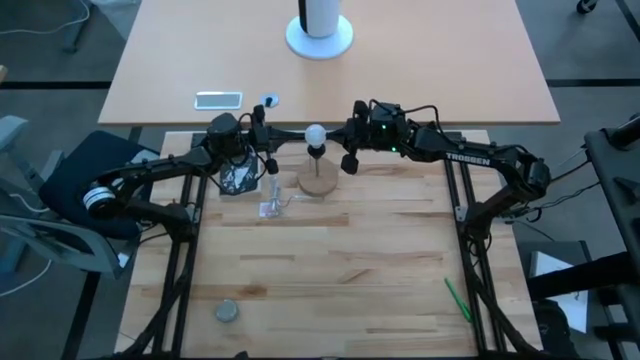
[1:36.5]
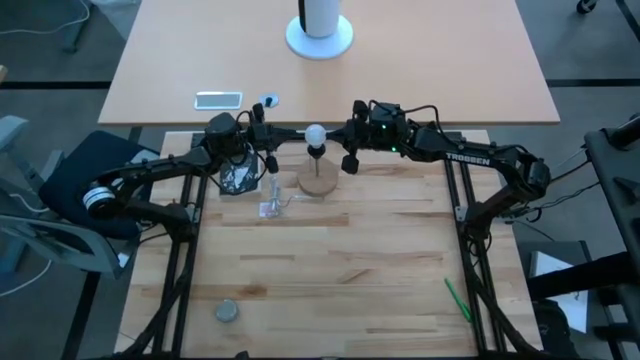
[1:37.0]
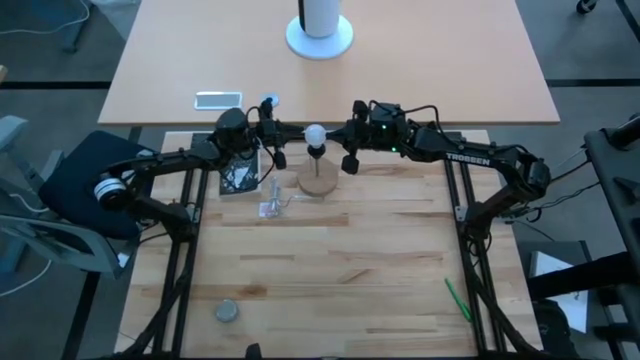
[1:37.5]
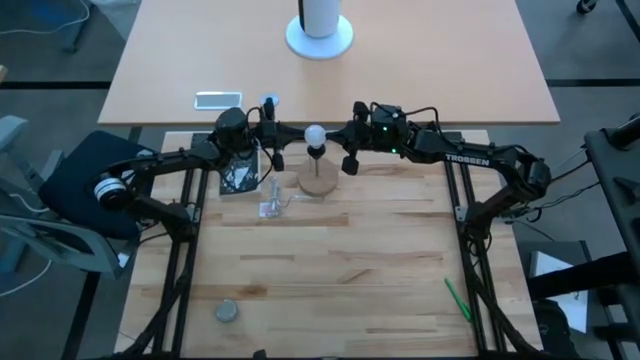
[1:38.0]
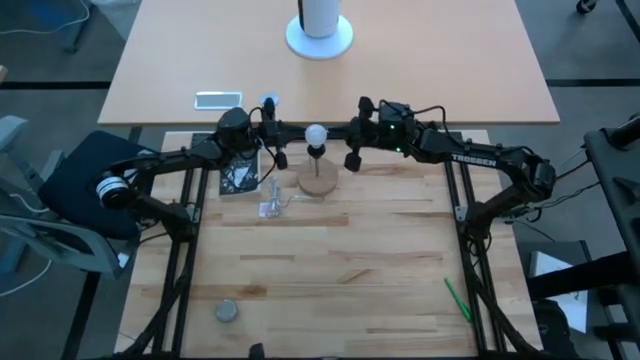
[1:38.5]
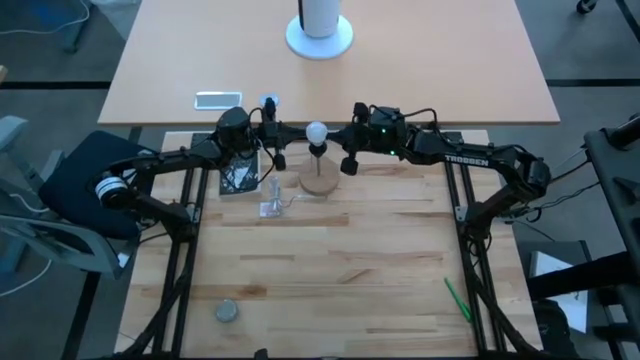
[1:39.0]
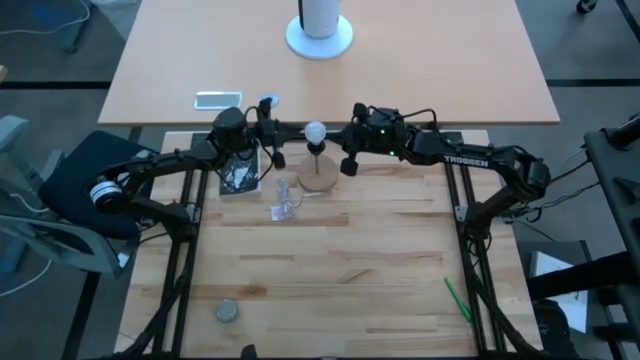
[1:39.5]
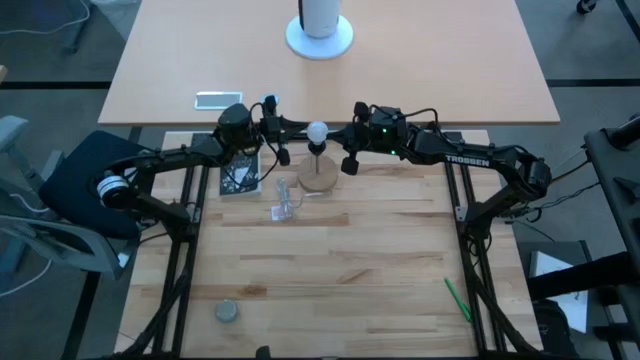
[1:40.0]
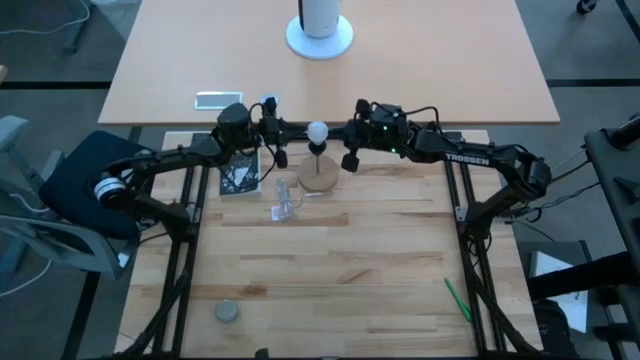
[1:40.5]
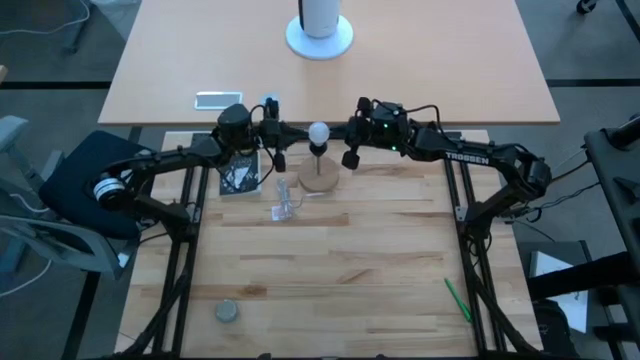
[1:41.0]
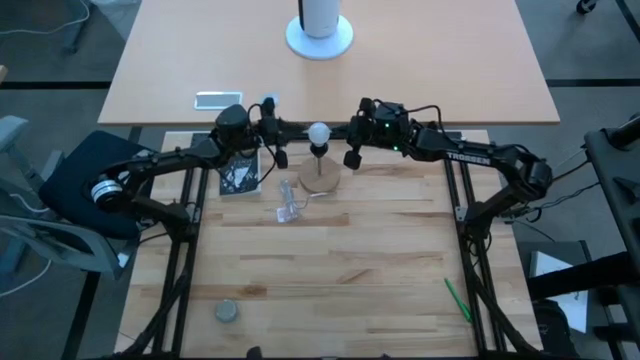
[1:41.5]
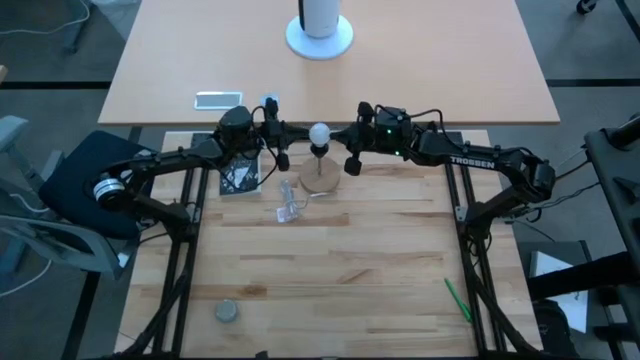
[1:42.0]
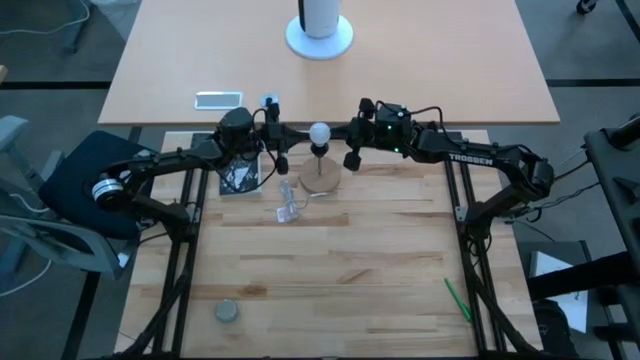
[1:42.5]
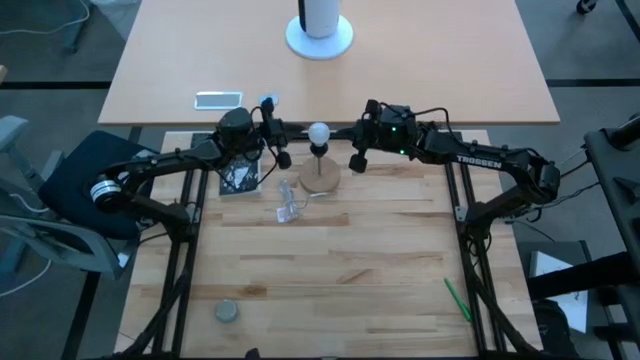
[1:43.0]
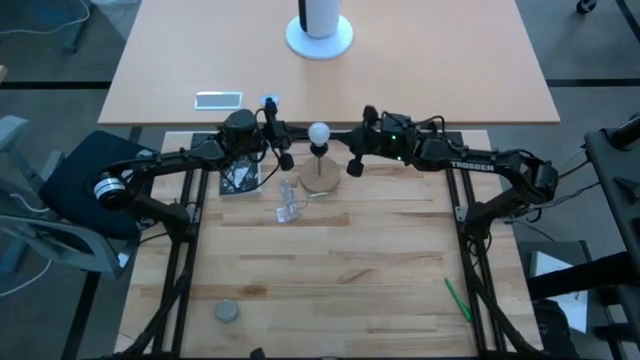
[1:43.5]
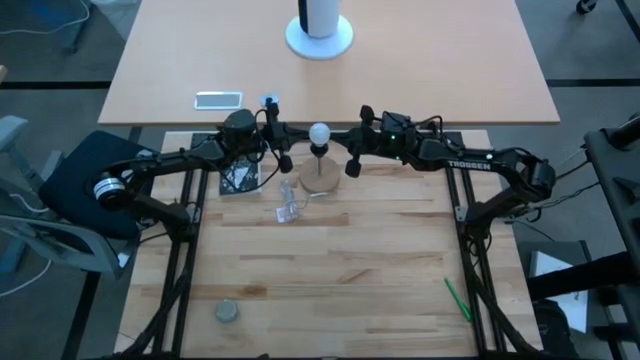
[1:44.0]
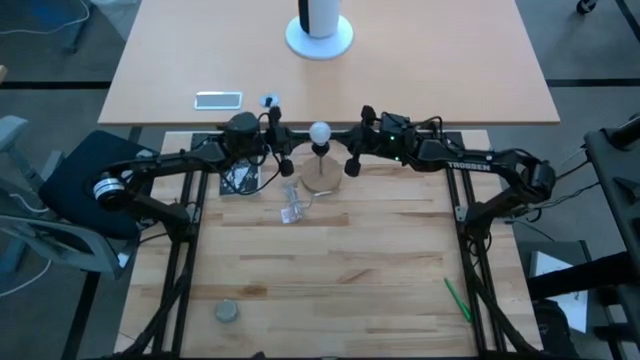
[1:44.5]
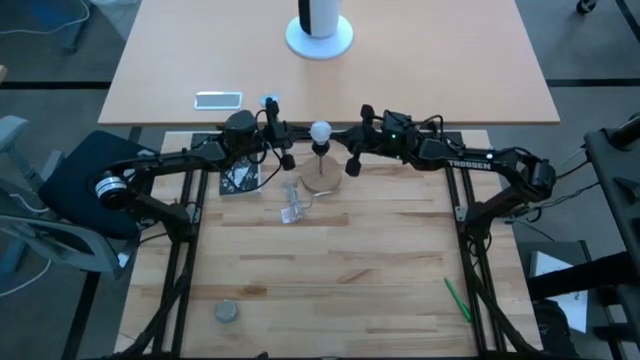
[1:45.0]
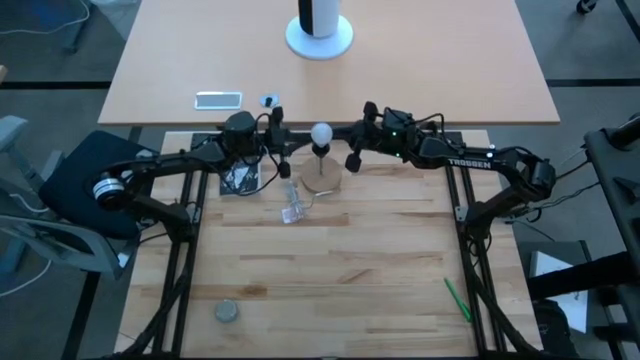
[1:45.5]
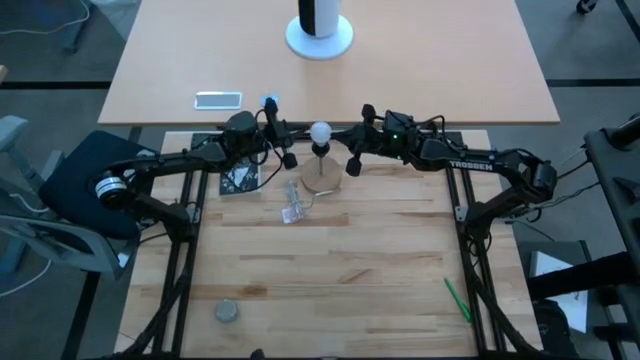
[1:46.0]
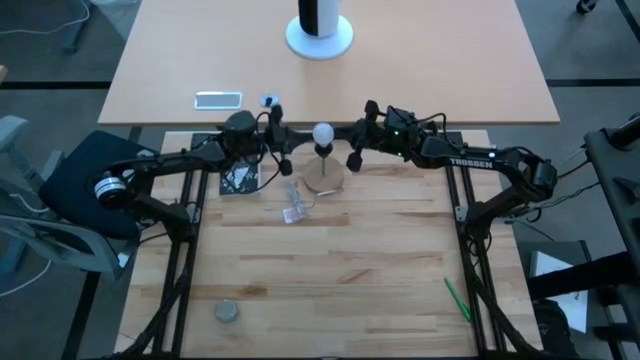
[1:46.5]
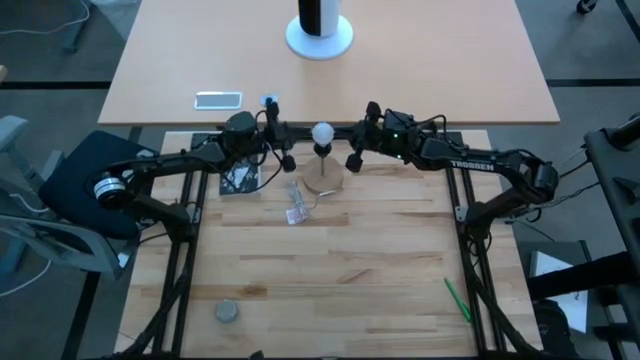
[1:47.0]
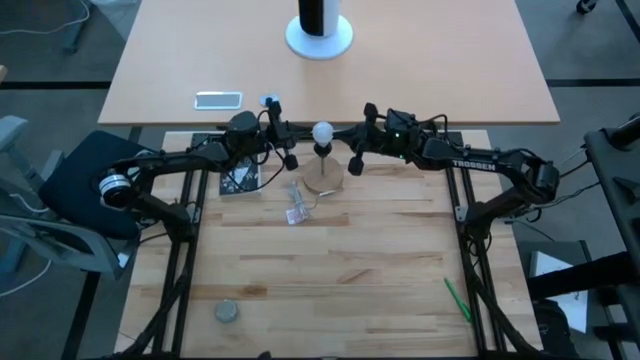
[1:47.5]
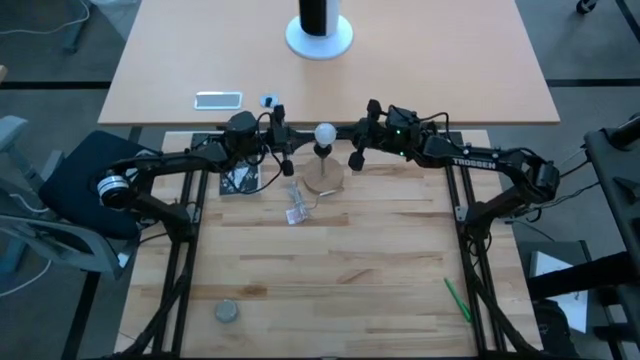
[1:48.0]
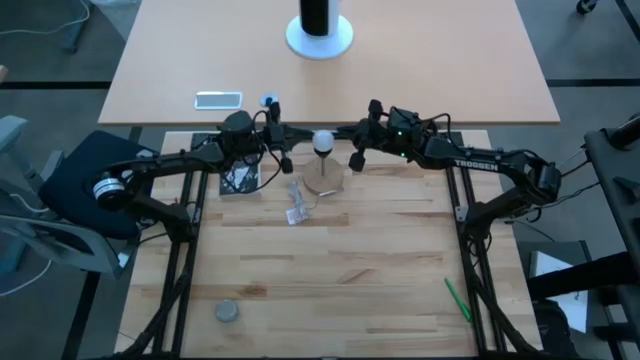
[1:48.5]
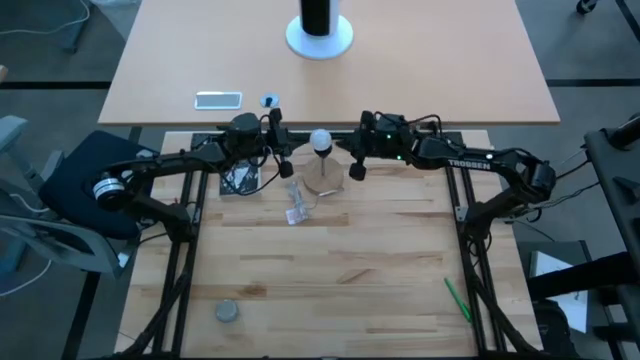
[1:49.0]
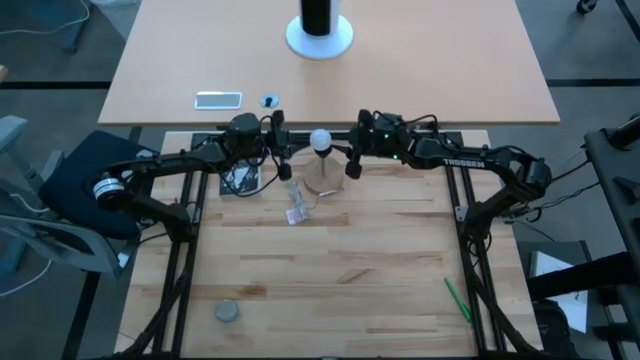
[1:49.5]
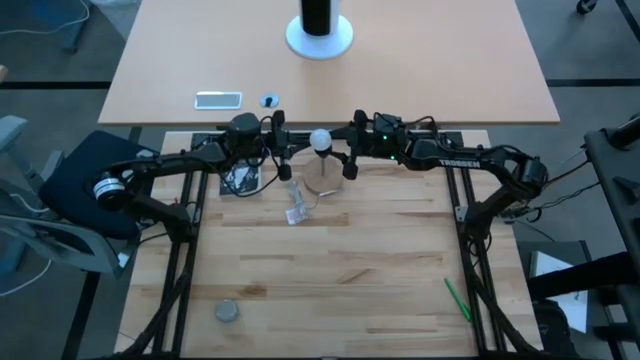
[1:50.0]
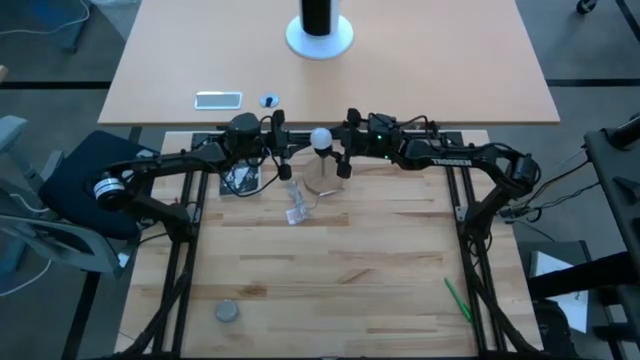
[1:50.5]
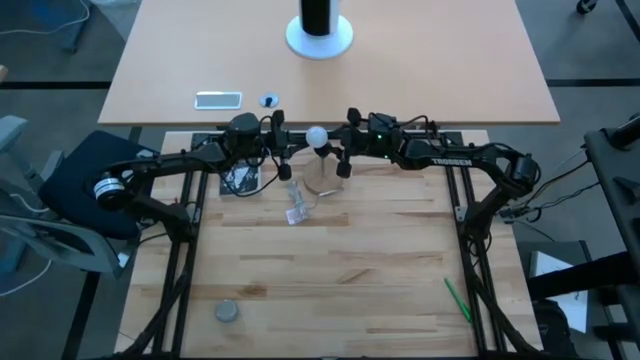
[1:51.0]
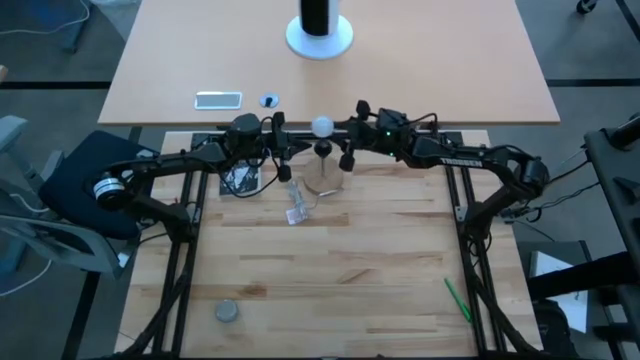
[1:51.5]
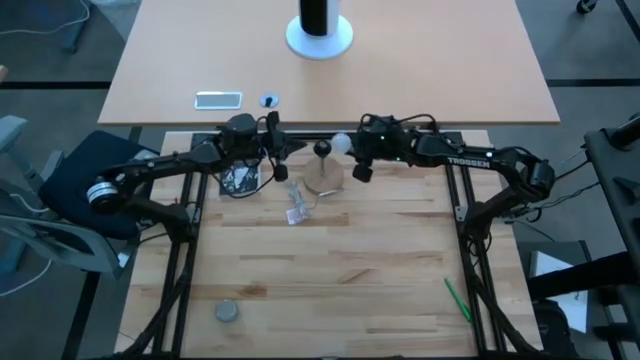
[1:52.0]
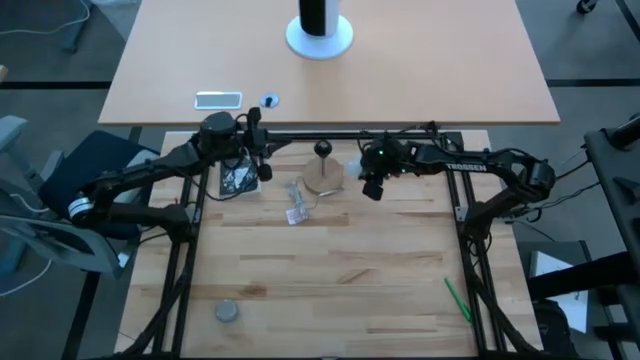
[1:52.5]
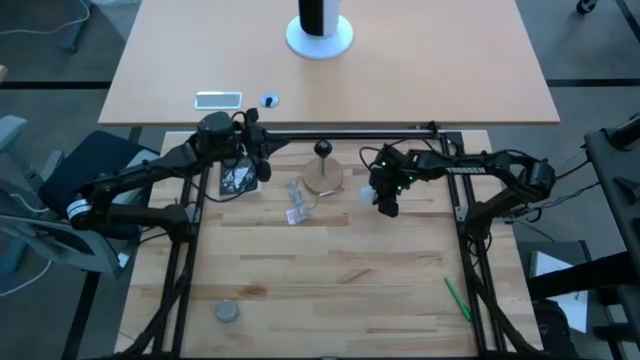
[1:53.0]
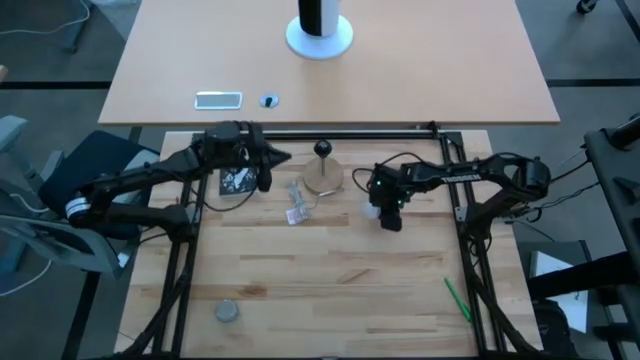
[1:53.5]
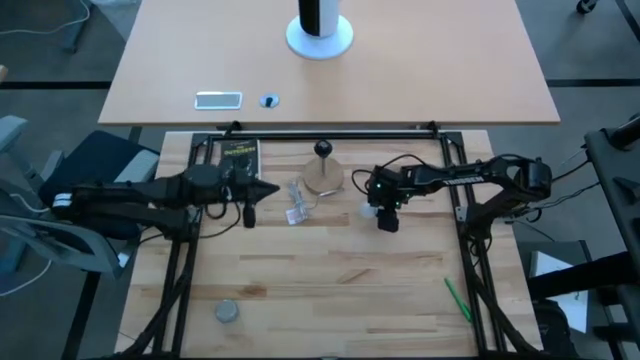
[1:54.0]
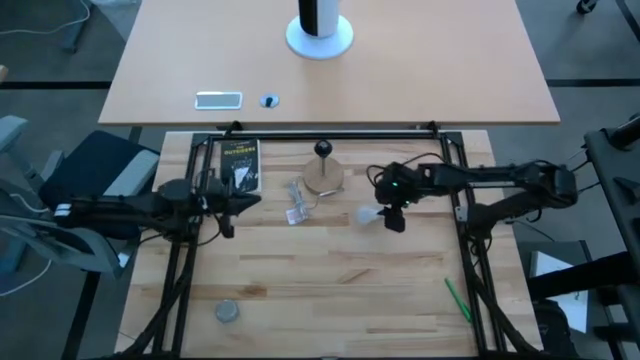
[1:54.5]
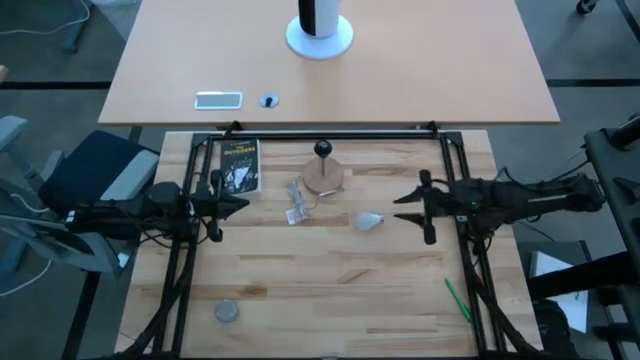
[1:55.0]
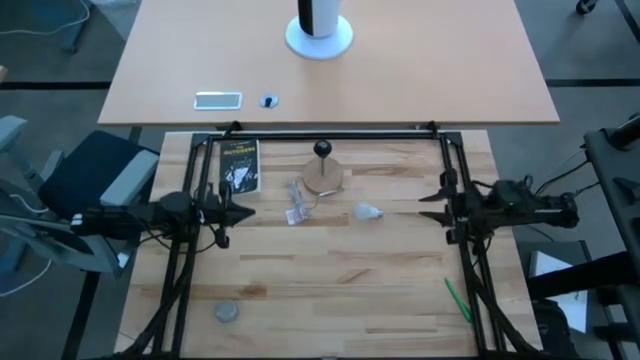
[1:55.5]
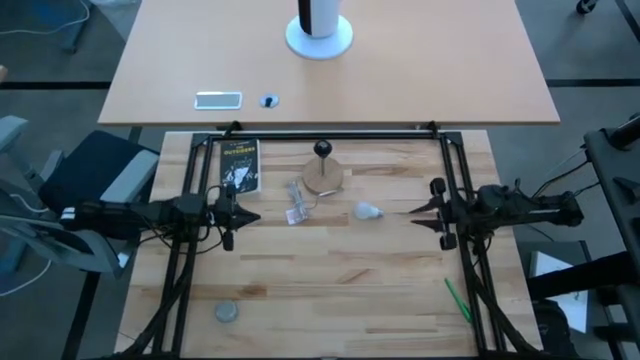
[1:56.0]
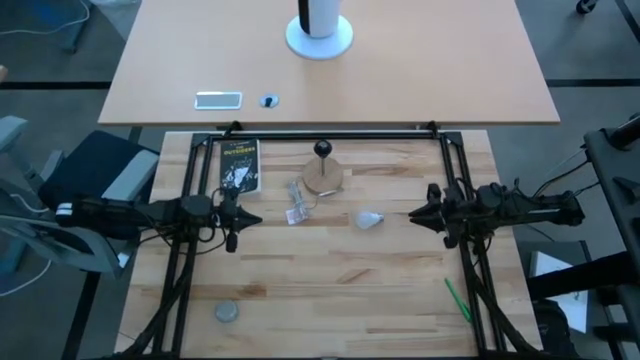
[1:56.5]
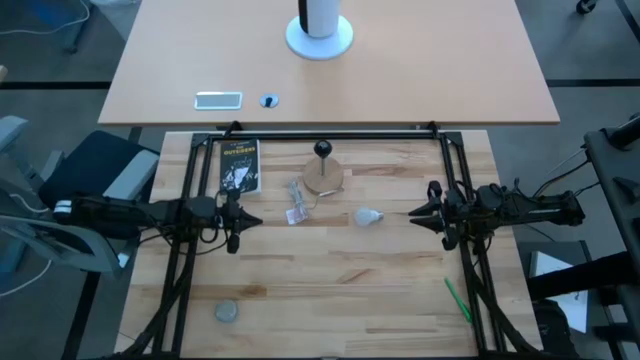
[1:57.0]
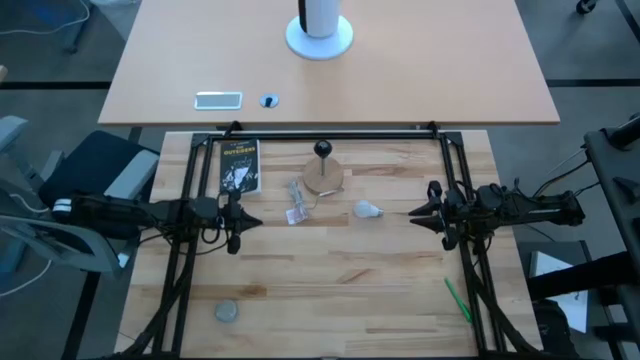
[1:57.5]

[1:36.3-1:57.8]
Task: Screw lightbulb
Remove the lightbulb from the lamp
